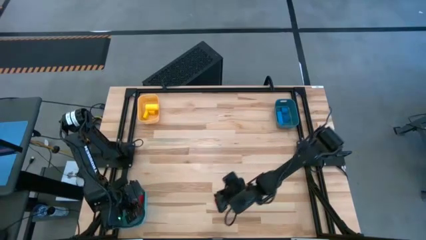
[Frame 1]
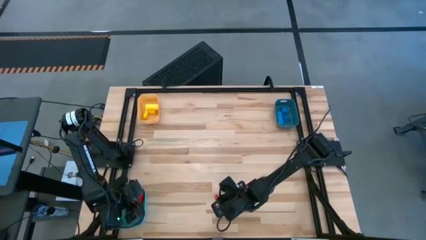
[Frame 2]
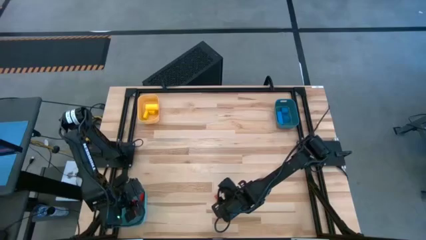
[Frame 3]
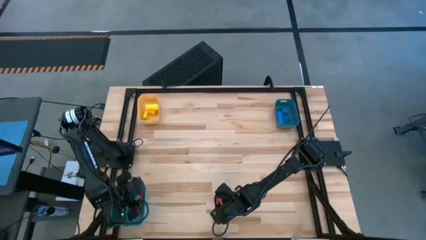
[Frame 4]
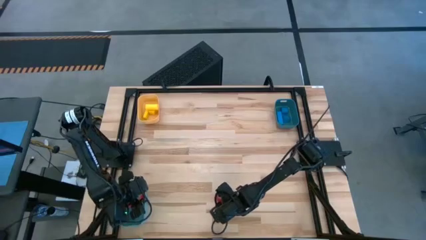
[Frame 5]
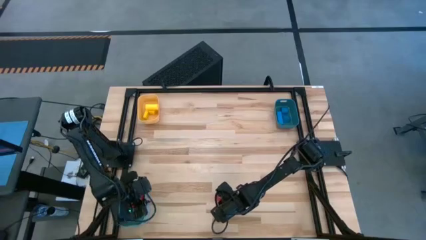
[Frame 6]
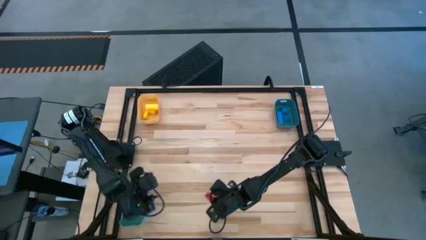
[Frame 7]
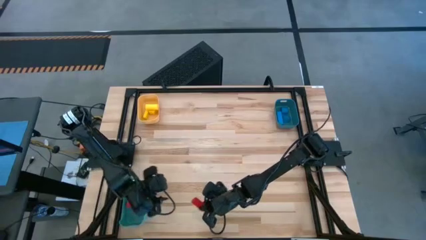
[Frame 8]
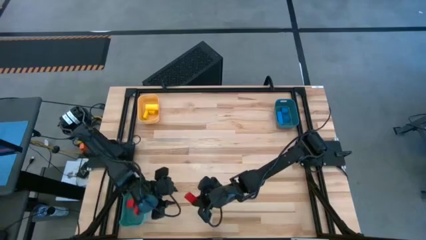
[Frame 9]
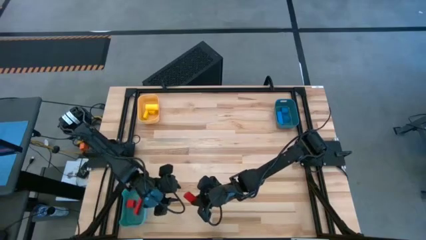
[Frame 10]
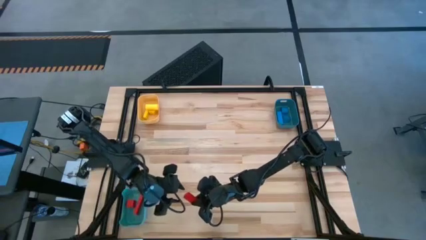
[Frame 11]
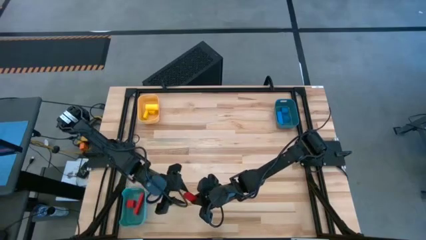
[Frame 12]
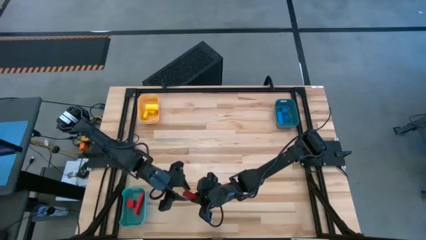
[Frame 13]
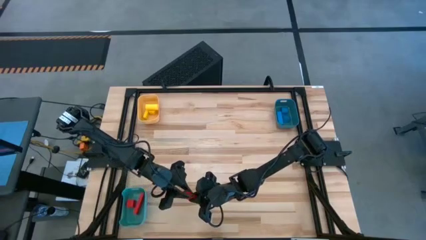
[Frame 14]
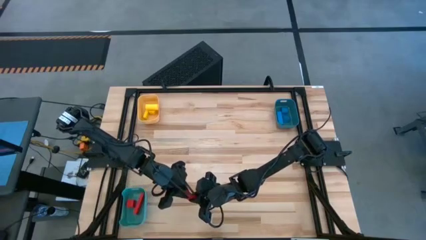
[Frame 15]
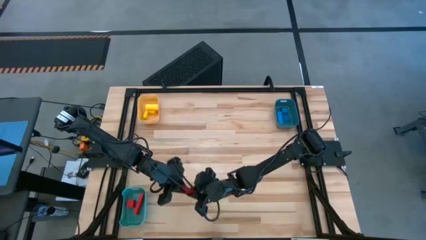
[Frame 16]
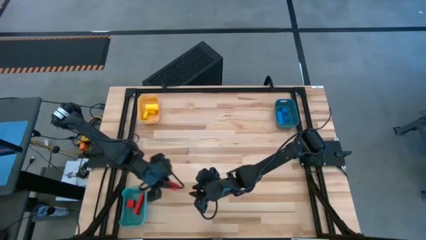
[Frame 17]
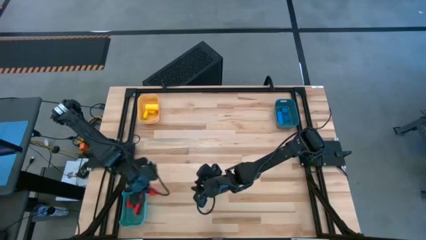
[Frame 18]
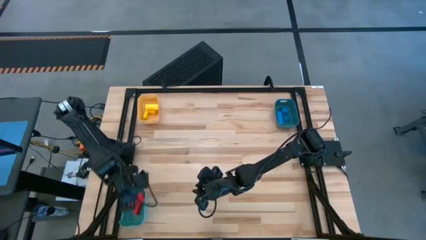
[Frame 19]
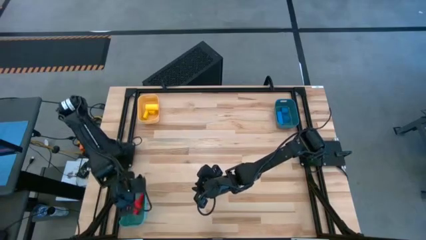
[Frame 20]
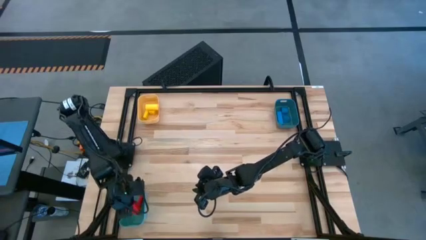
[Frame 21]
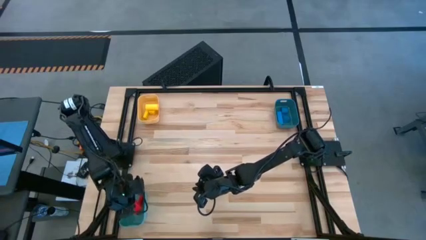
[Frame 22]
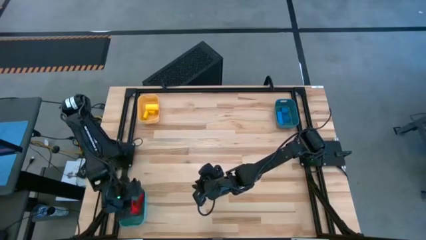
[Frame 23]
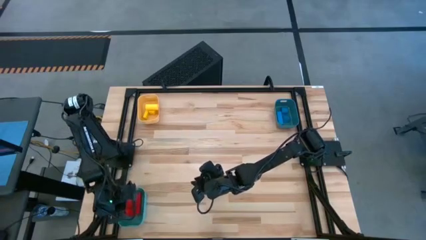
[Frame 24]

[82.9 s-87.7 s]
Task: Sort & place blocks by color
Put the red block into the green bin

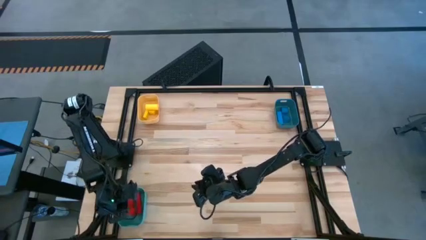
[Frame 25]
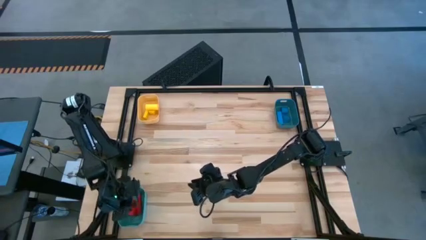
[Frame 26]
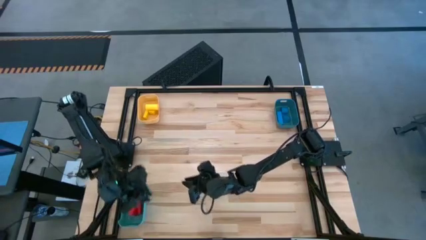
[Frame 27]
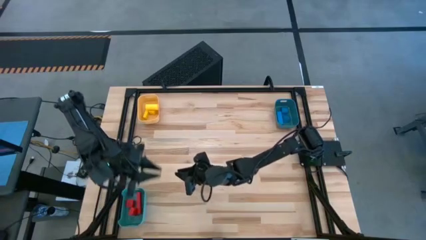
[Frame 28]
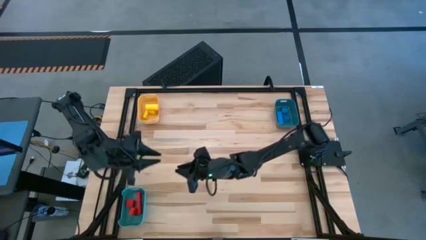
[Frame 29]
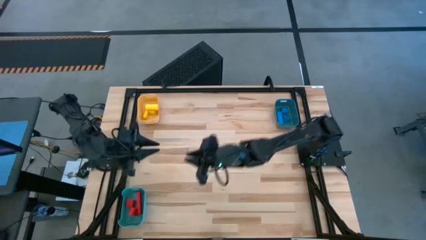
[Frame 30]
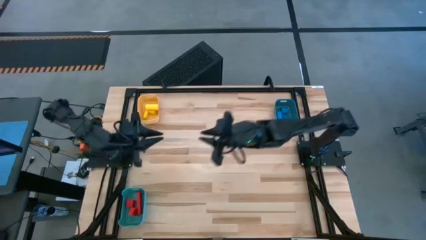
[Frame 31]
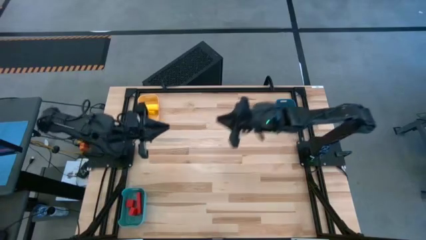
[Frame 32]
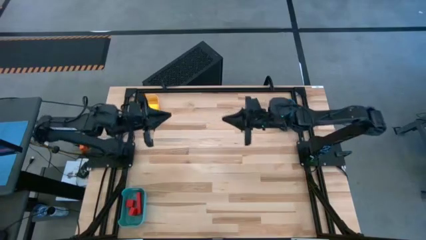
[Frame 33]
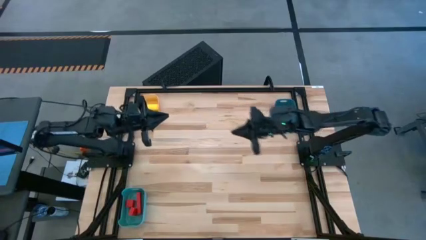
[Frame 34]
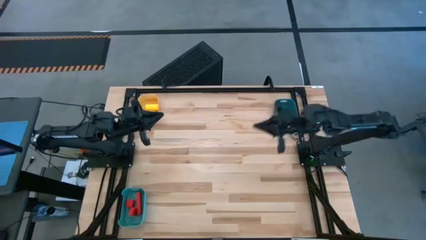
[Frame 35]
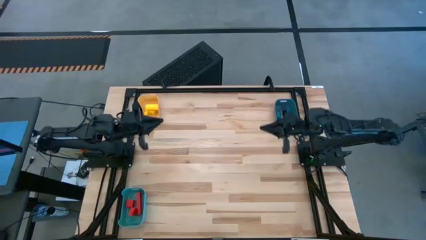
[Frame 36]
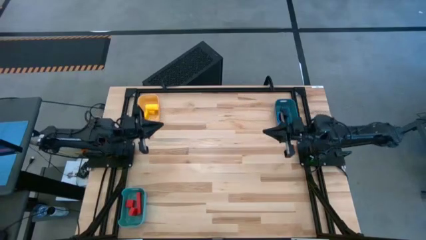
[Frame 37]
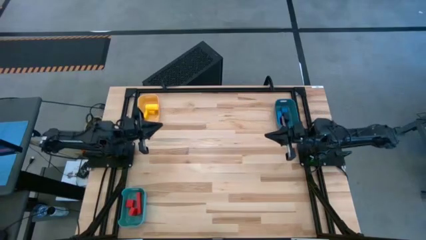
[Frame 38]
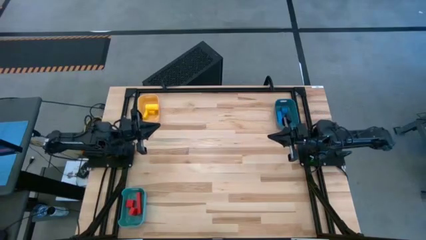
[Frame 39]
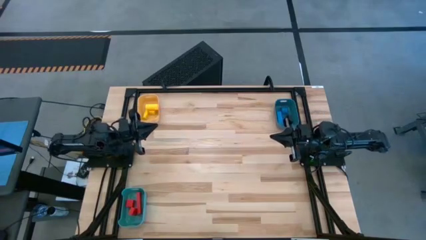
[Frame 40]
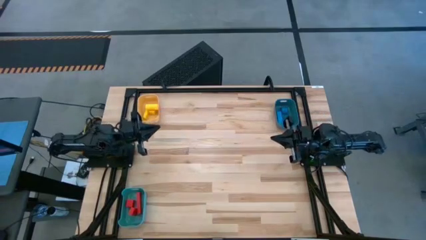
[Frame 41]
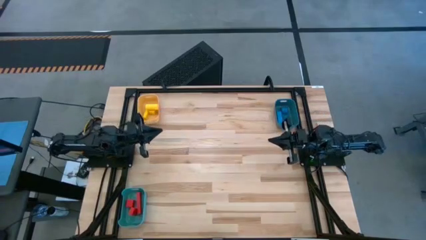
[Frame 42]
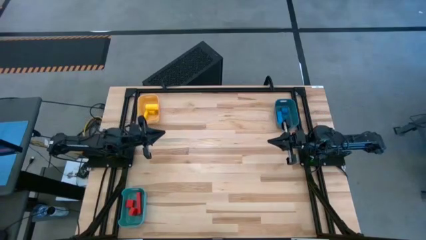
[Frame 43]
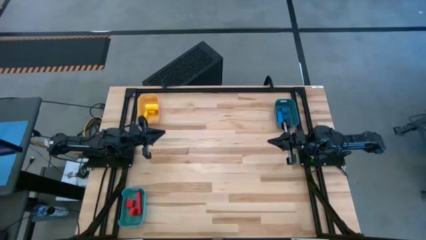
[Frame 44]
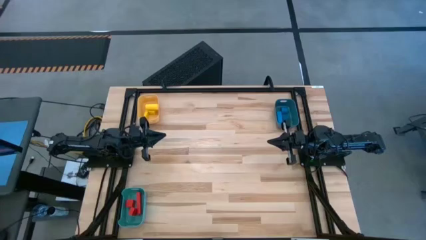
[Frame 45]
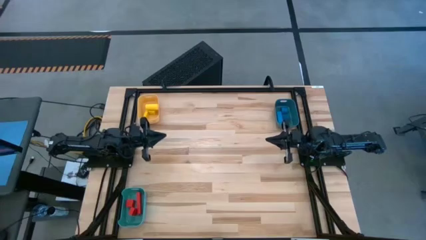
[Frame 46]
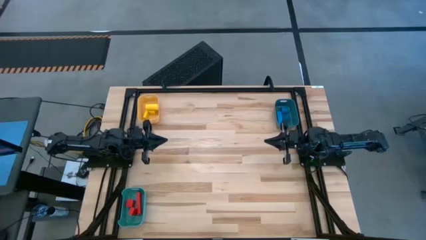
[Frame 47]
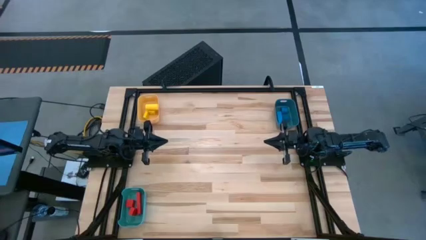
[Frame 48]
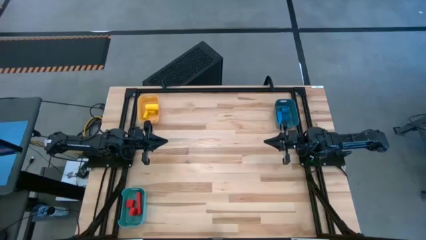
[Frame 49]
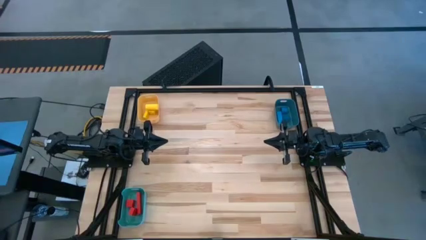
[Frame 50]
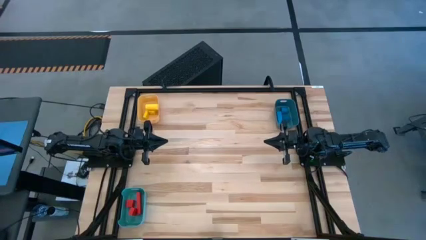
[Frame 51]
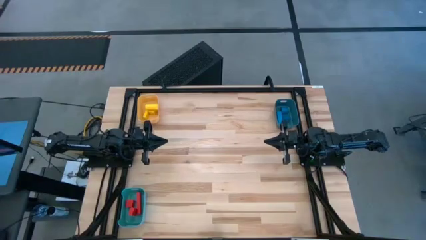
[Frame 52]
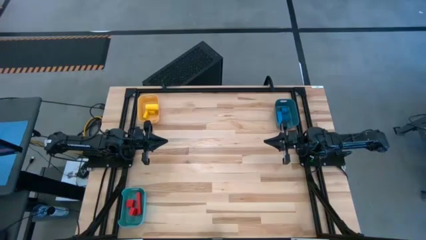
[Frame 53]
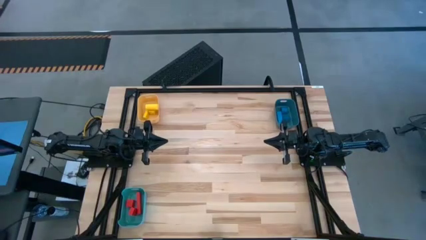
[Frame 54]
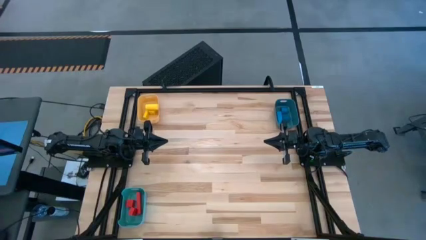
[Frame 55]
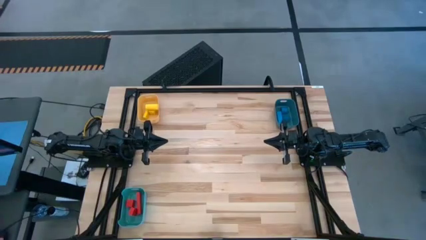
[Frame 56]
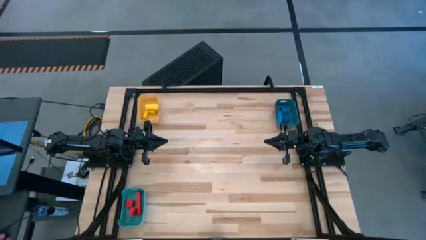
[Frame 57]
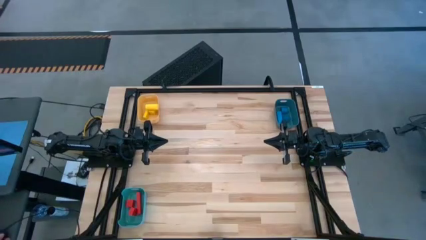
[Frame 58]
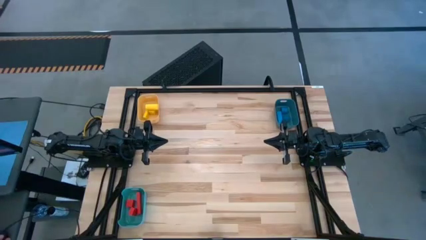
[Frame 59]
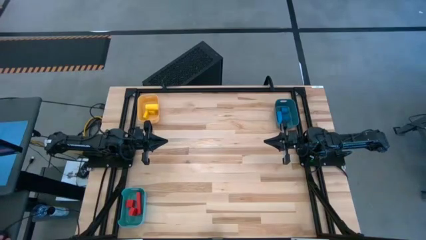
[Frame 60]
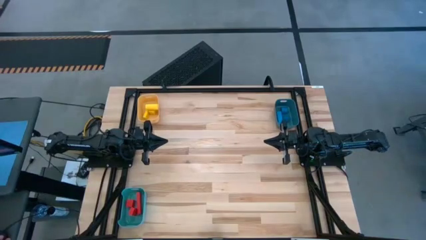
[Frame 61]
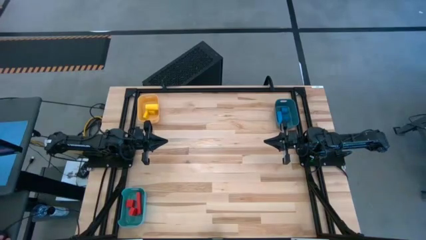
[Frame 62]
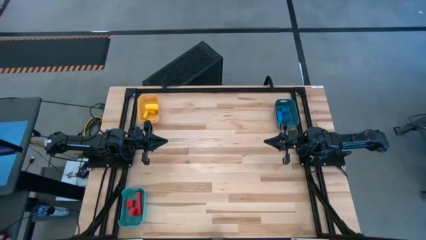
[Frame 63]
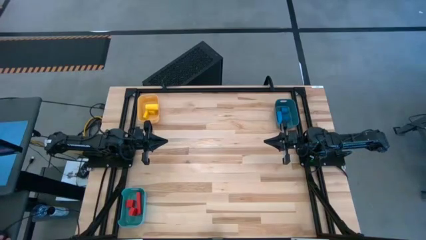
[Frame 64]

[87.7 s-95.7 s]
Return to Home Position

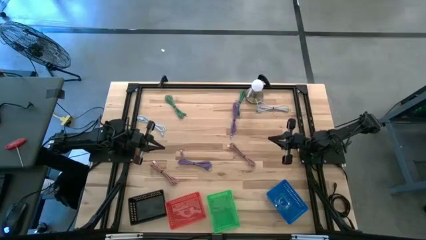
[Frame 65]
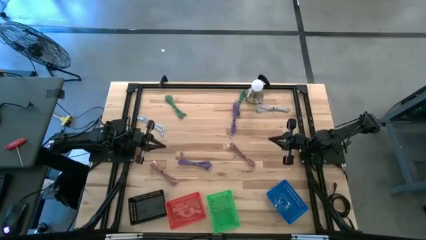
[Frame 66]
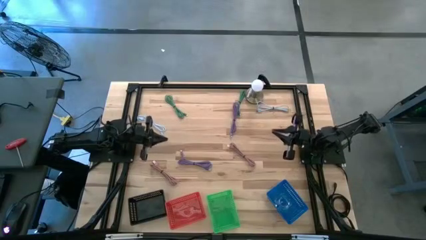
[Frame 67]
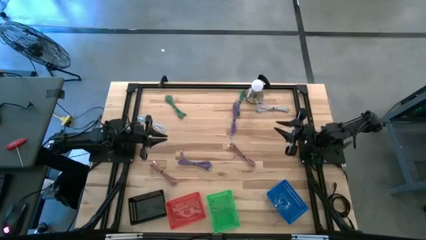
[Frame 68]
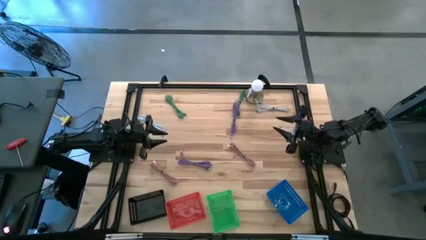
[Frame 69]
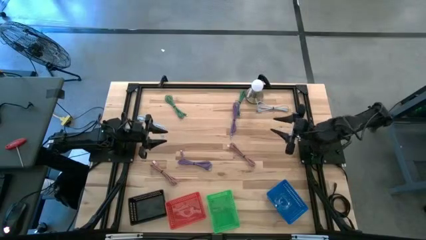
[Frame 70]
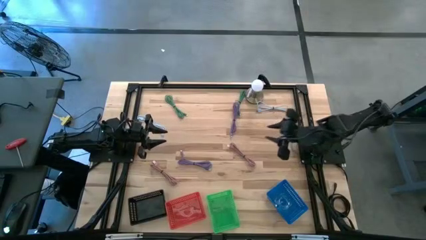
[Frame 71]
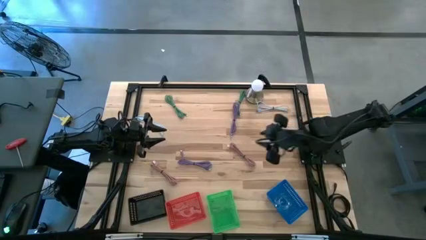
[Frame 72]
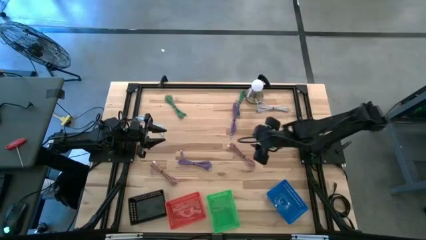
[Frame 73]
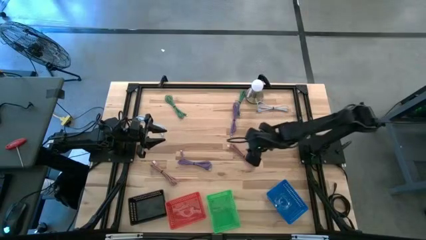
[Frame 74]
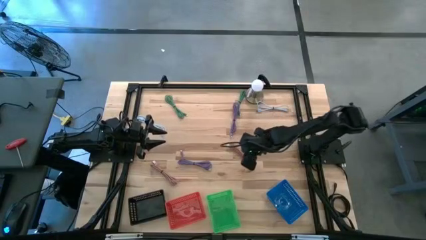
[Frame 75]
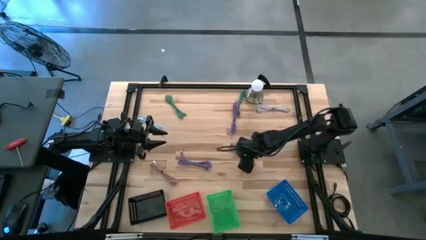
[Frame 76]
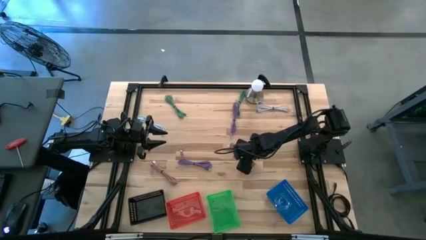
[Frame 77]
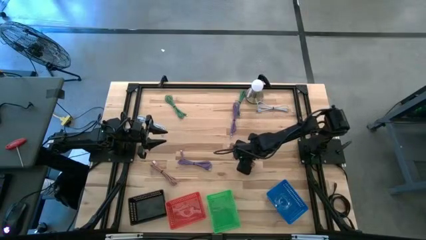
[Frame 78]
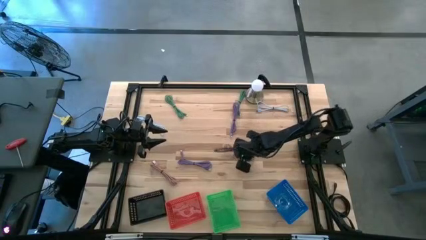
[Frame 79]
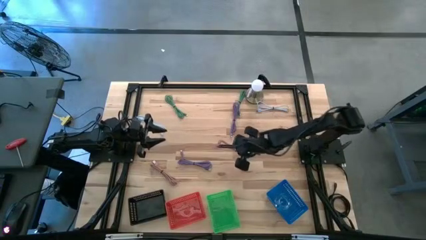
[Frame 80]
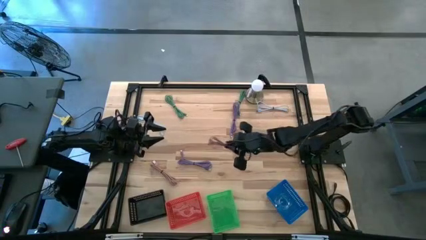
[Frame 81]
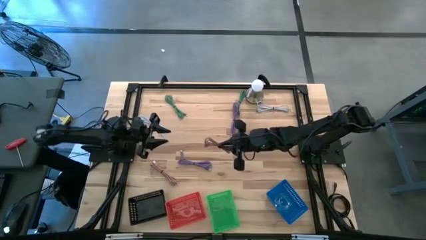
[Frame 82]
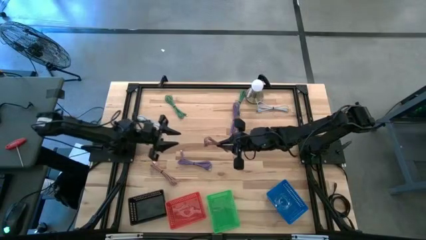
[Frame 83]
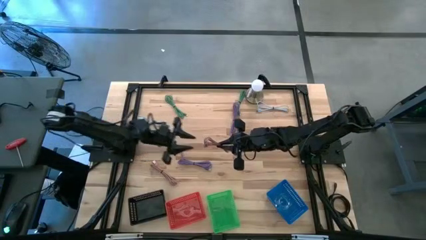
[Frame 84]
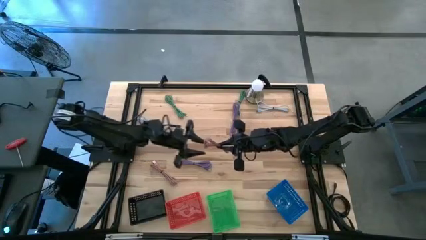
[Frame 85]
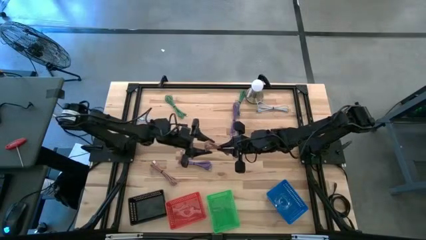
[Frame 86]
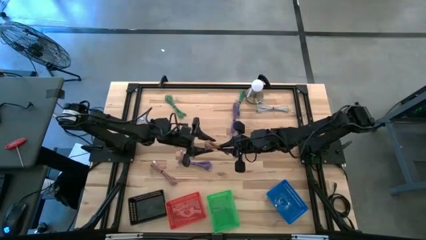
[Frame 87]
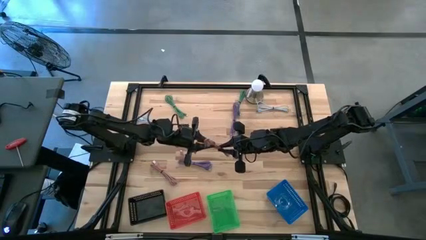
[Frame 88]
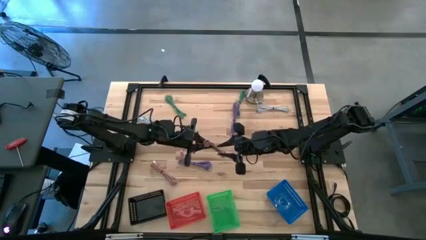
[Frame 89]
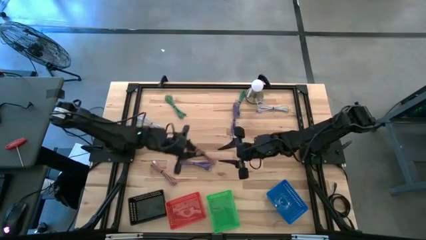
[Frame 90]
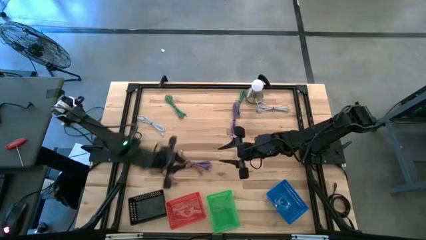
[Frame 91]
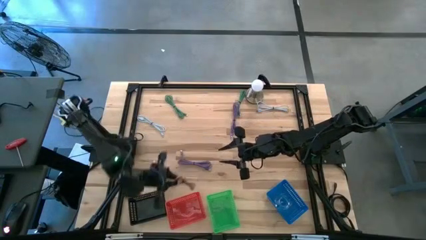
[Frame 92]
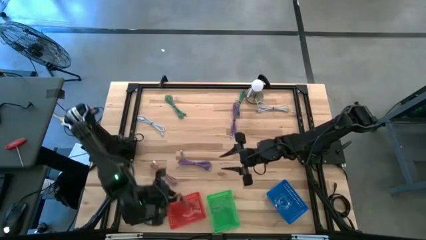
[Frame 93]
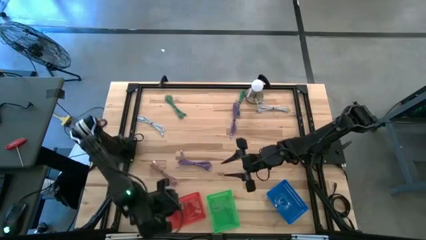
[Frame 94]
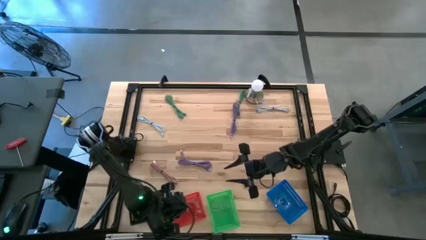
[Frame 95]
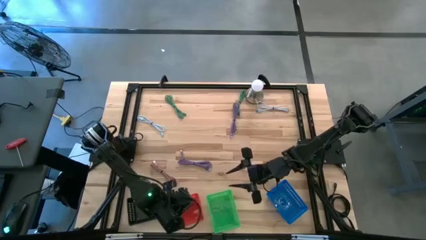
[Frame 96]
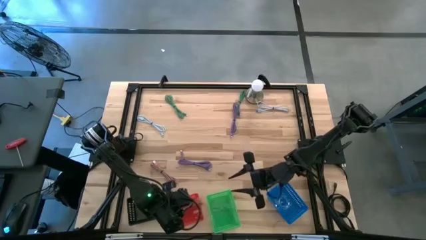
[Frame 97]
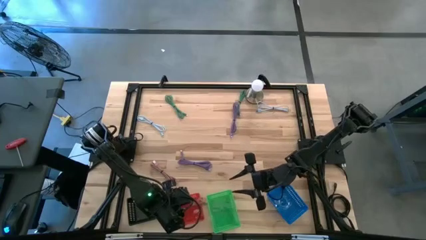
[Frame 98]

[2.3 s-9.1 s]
Task: Pick & Place USB Port
Put the pink USB charger into the red bin
